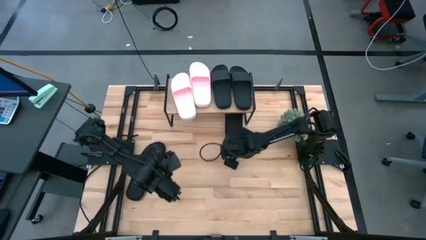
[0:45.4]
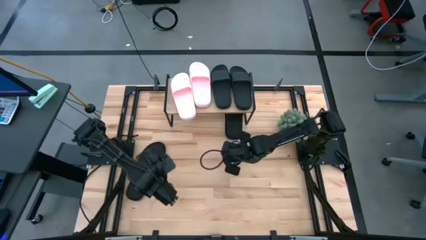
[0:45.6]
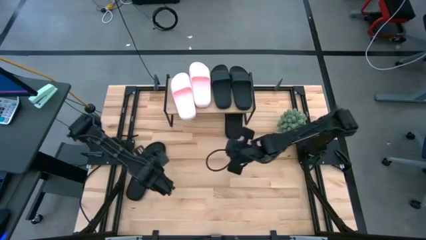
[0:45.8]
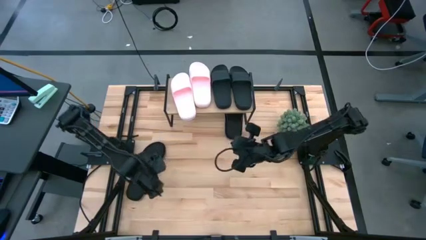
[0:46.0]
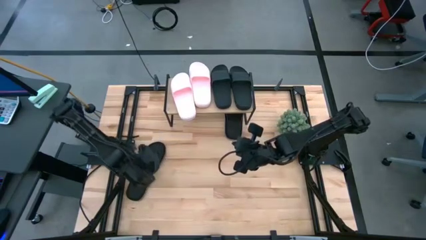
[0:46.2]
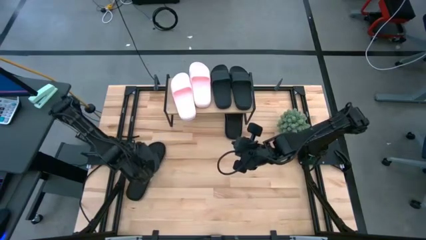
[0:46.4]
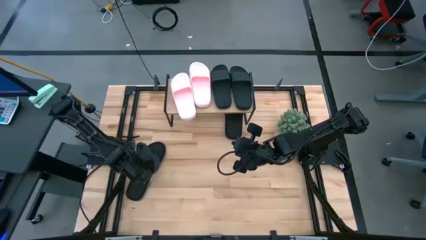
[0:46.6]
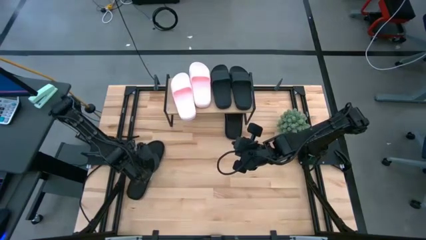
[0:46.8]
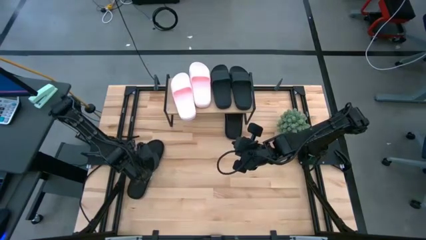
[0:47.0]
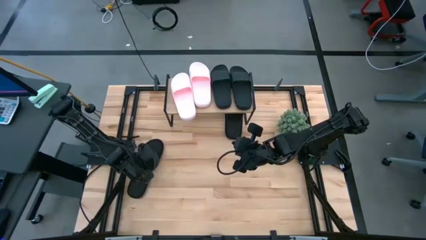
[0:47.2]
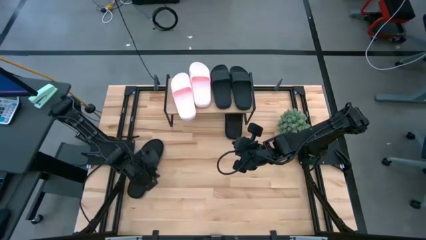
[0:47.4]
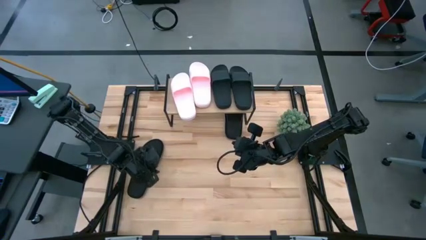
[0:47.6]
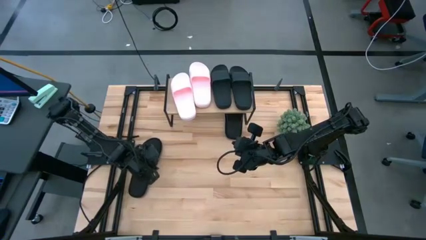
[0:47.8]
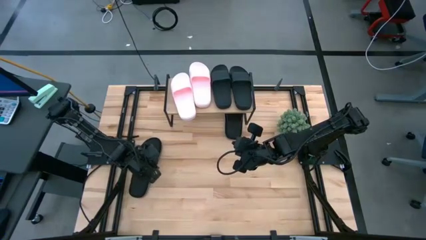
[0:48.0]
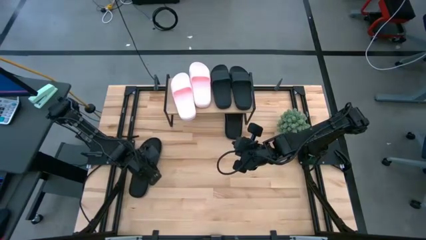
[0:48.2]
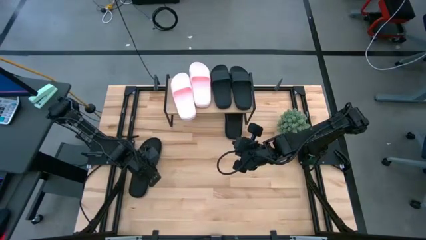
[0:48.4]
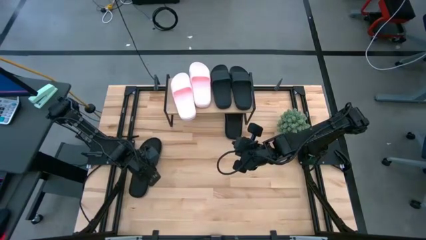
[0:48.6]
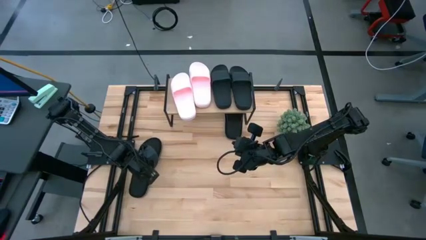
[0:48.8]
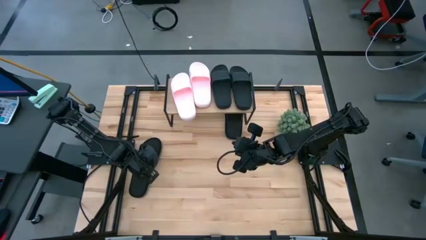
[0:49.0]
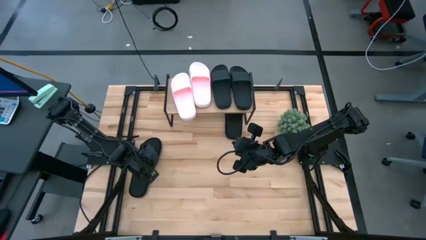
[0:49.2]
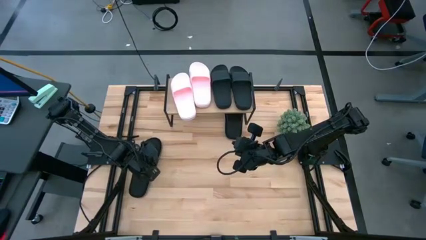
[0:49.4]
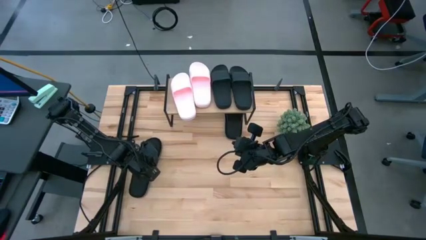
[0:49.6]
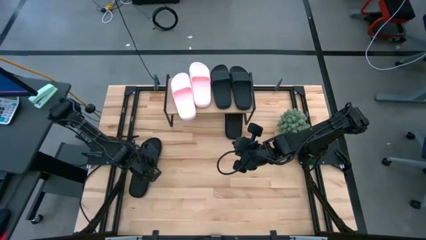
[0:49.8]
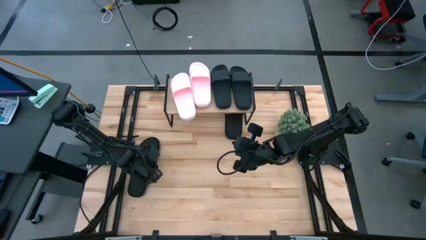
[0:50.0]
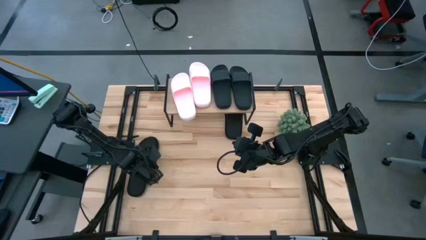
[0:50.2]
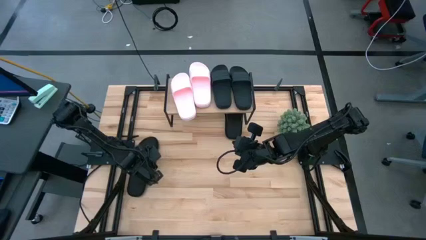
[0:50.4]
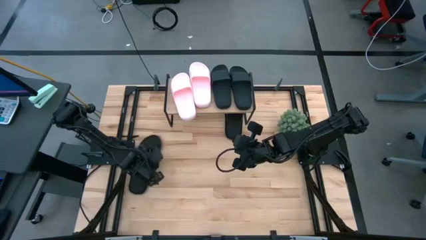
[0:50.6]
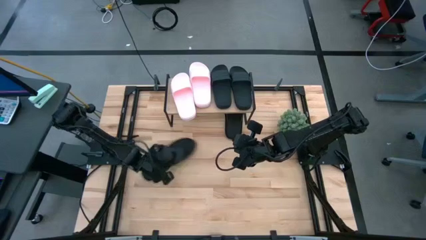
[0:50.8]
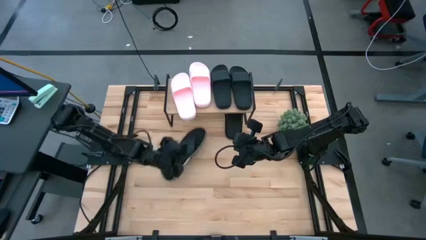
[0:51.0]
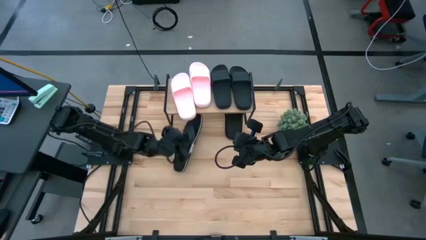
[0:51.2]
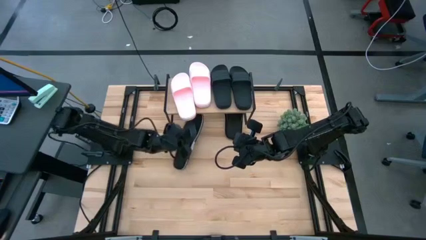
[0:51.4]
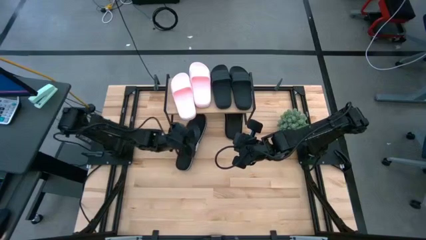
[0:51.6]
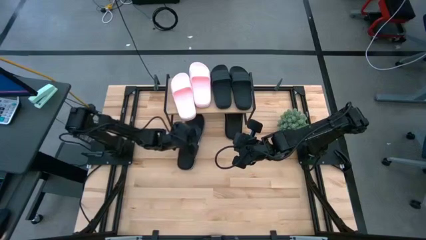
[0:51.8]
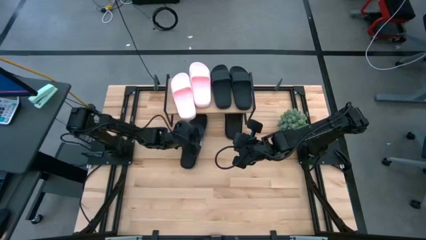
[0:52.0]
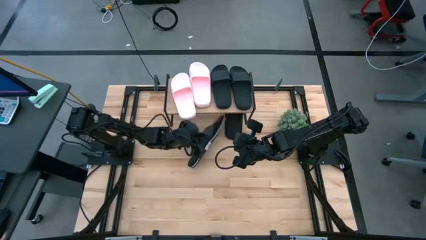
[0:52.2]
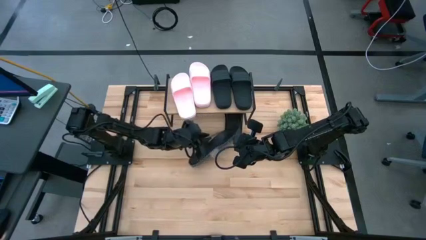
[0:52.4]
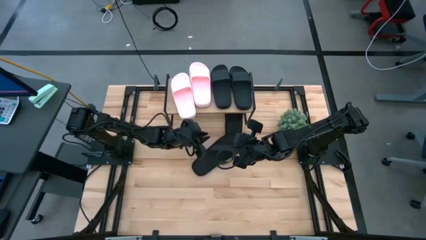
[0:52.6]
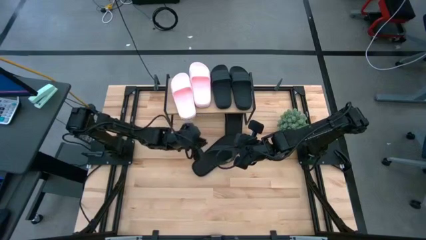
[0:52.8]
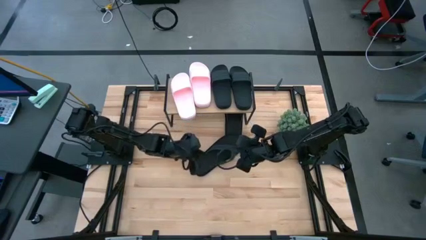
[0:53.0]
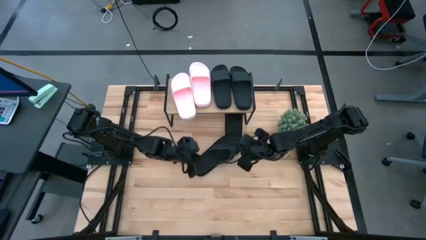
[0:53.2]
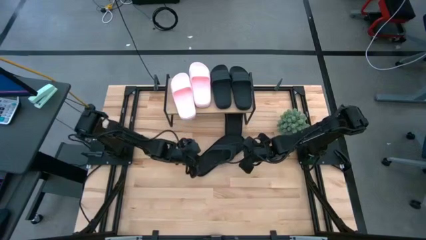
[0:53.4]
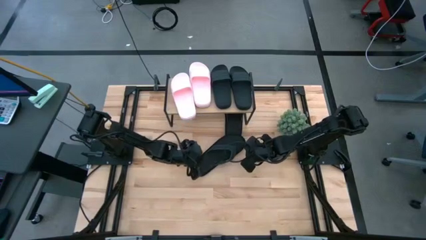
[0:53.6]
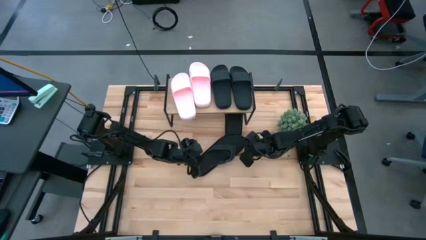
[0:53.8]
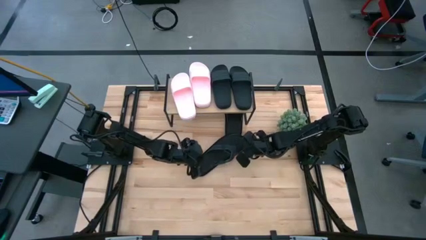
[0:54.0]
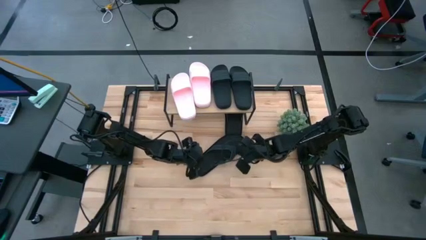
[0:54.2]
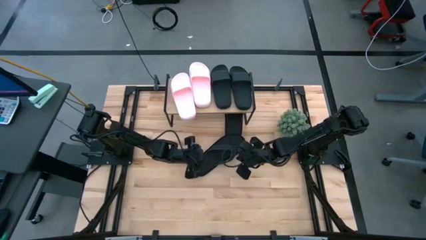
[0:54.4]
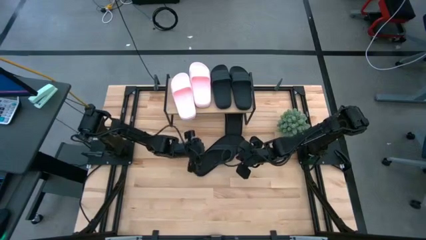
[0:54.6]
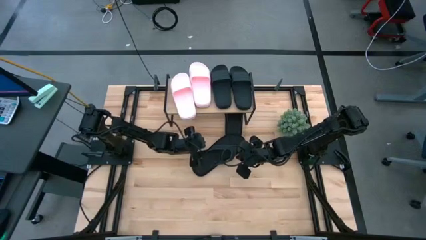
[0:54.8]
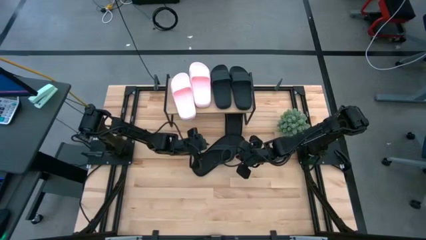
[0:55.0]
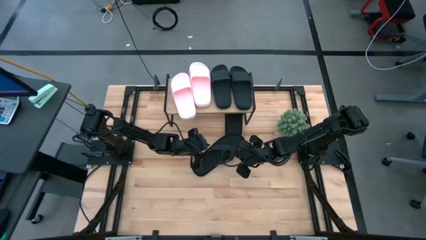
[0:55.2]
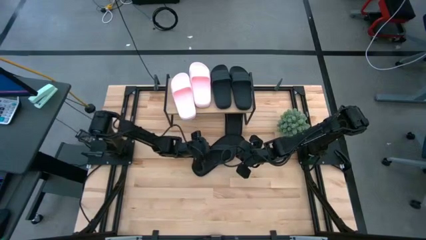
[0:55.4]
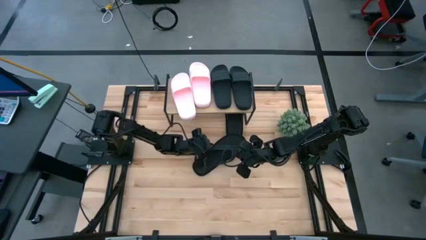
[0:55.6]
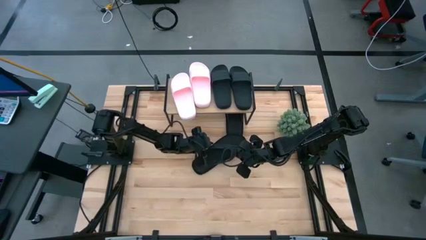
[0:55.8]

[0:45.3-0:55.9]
Task: Pick and place slides into the shelf
Put the left flip flop under the shelf

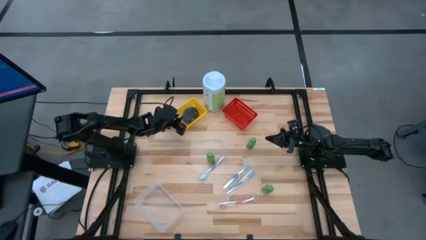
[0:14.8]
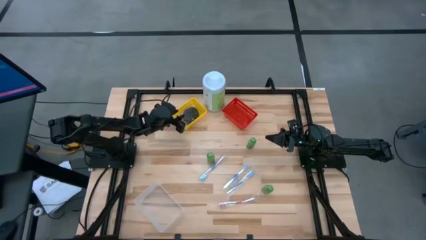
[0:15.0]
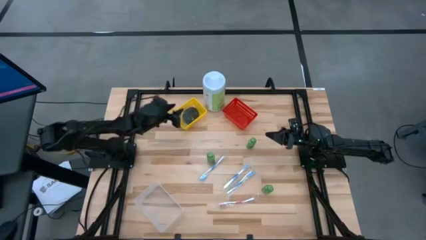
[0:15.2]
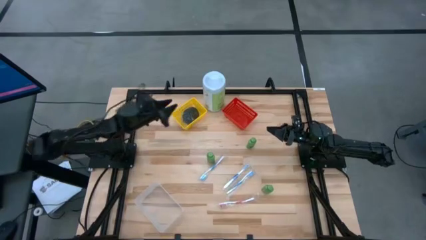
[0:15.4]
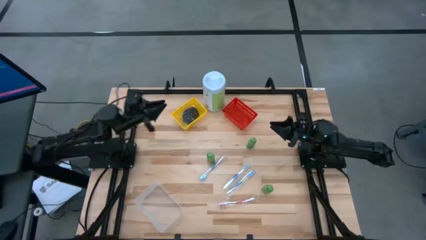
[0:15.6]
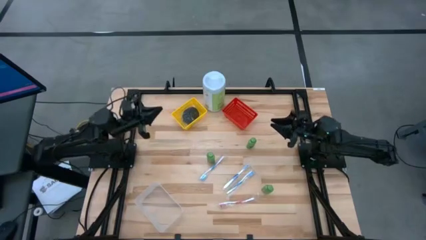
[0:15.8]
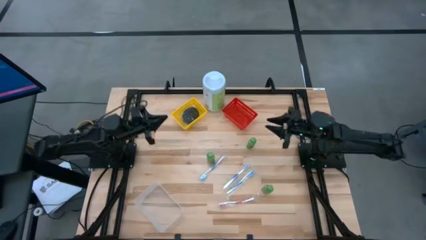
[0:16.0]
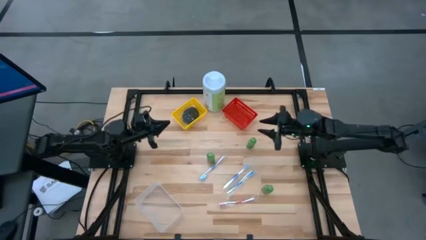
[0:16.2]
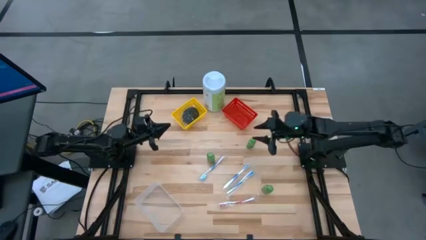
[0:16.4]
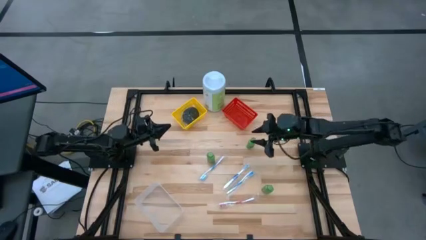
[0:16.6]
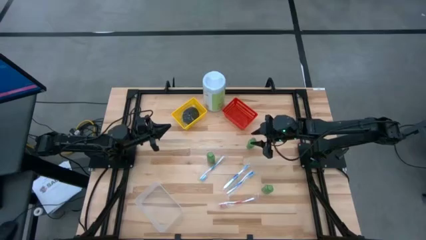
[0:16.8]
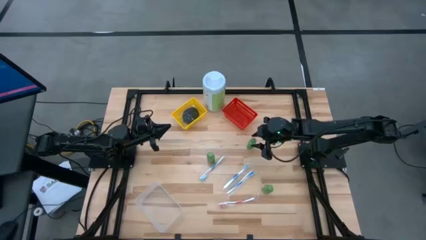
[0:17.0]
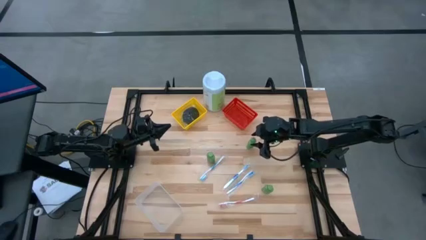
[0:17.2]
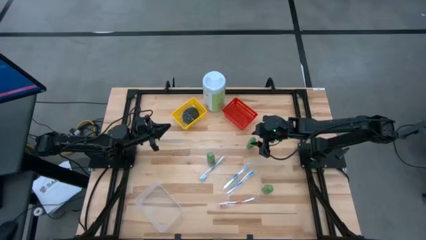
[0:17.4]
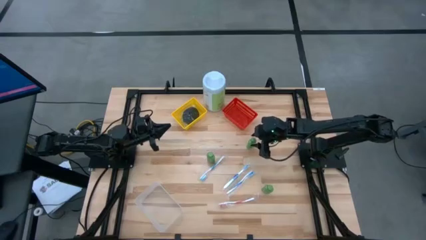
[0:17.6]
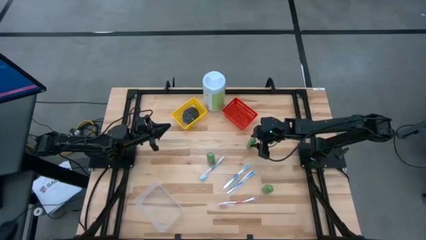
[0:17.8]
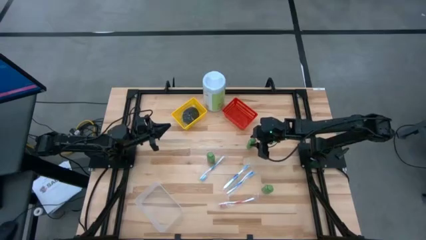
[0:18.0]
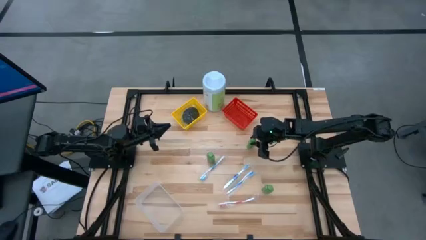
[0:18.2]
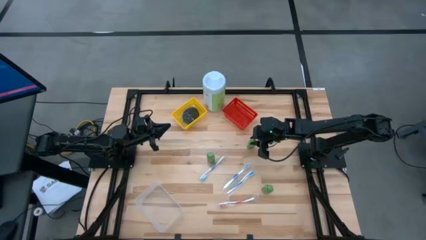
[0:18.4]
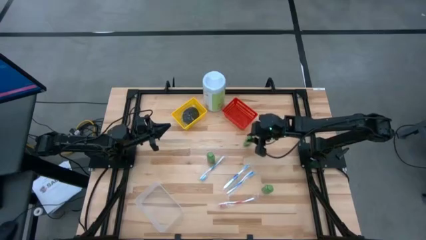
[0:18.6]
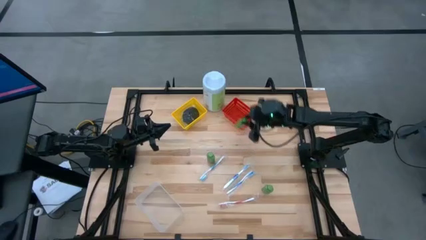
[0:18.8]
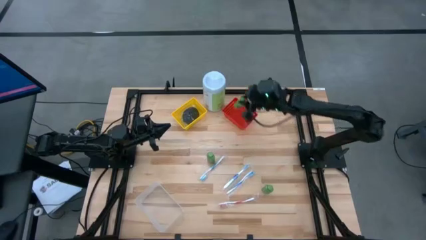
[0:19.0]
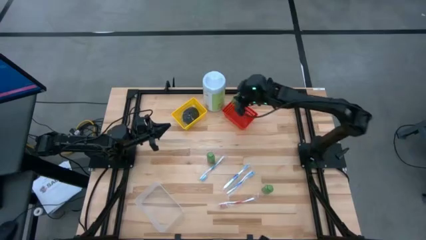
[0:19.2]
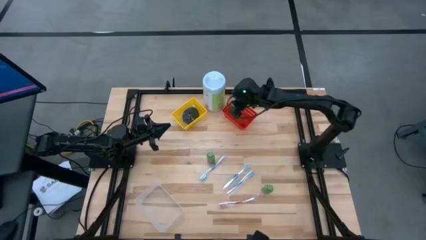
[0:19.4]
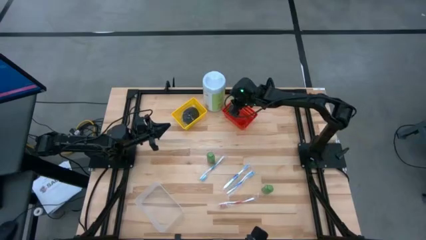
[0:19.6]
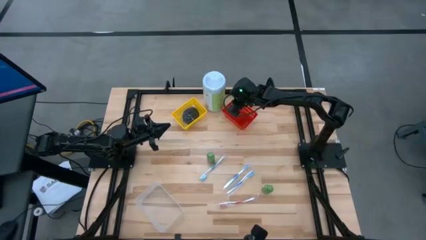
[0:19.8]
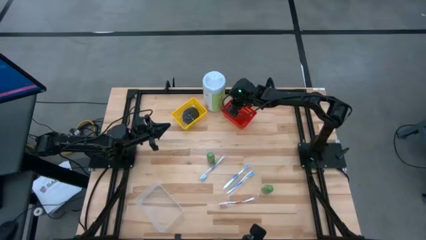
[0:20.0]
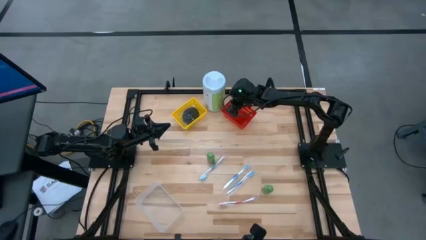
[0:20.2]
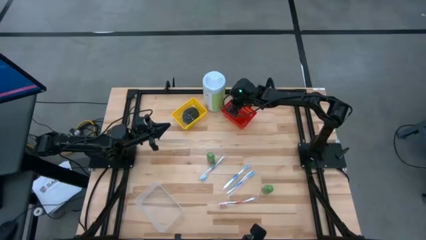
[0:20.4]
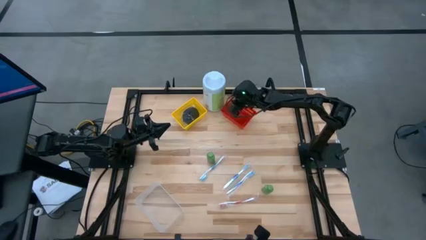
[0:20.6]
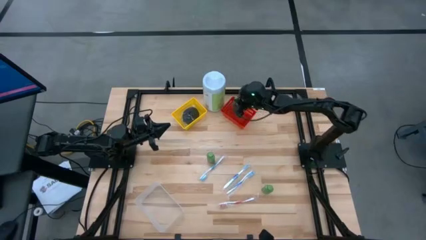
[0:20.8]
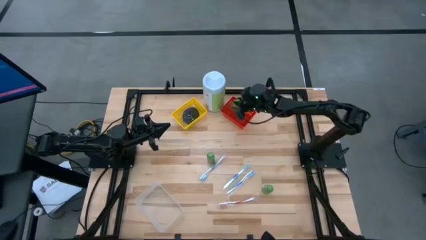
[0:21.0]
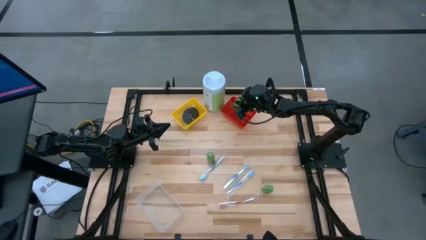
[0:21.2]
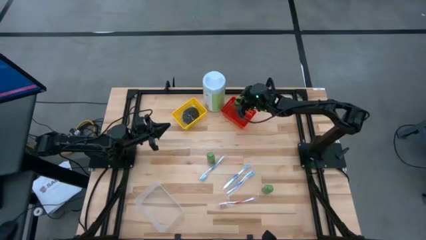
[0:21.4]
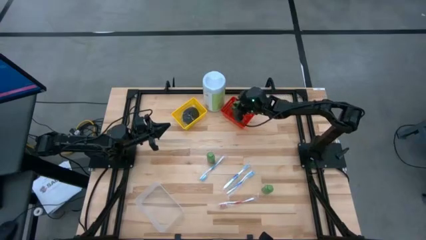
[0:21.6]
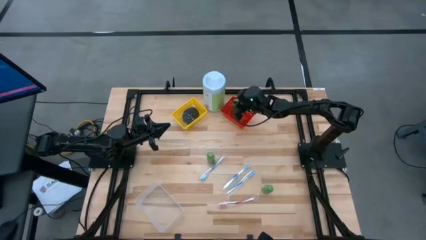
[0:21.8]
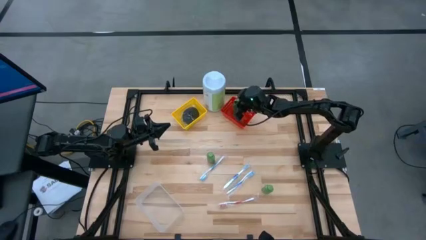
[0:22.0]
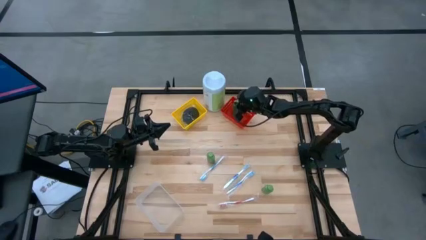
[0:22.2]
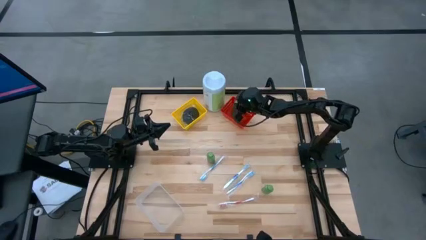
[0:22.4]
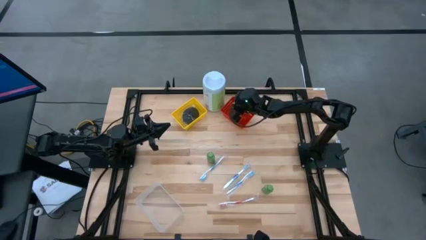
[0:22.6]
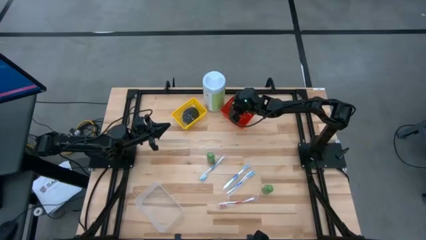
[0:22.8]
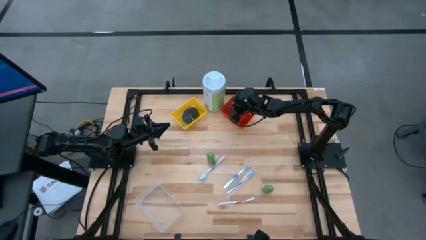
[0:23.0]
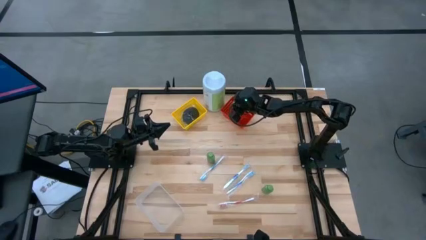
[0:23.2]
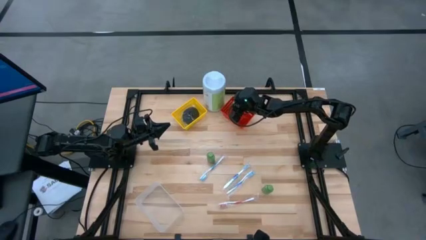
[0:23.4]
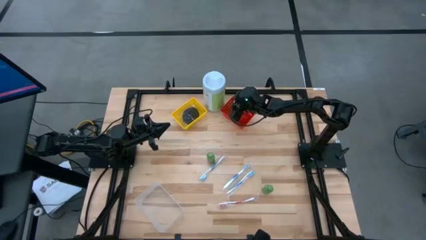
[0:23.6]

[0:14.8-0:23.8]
Task: Pick & Place Travel size toiletries
Put the top green shampoo into the red bin
